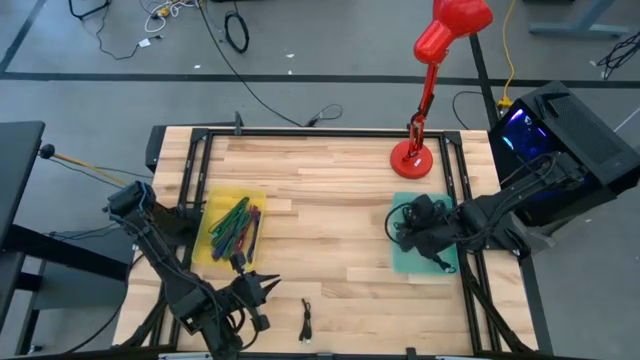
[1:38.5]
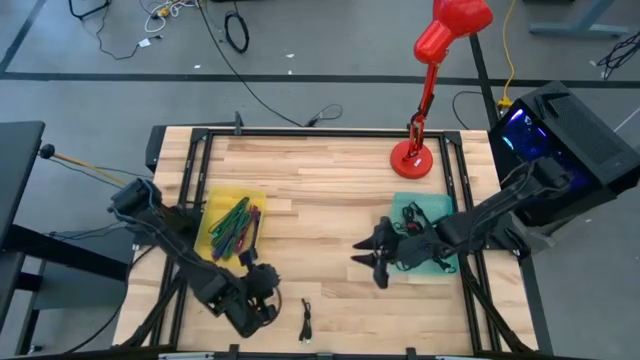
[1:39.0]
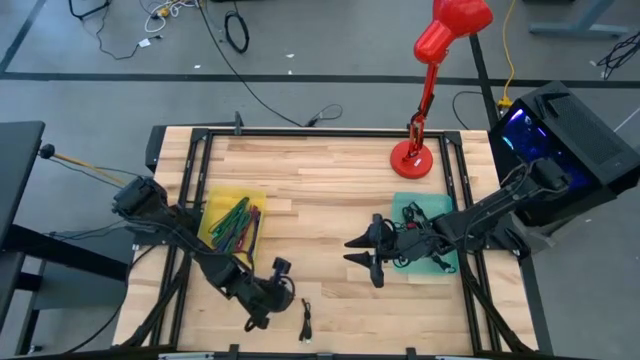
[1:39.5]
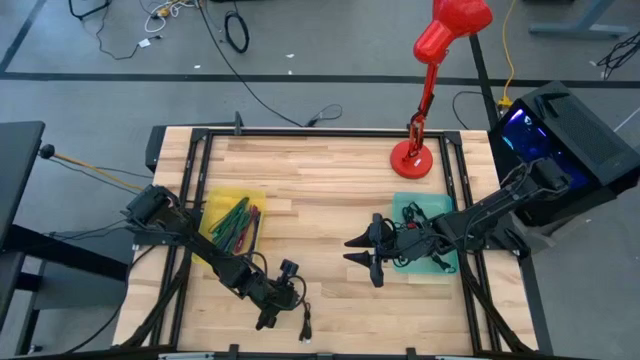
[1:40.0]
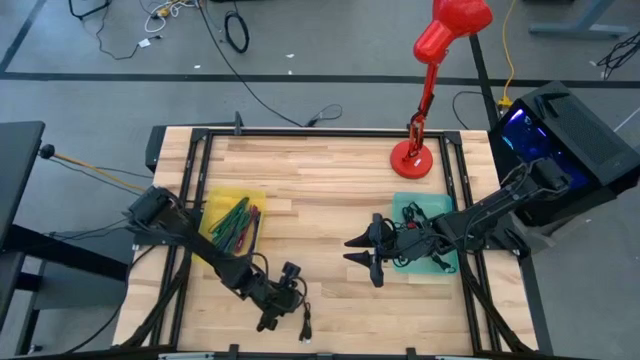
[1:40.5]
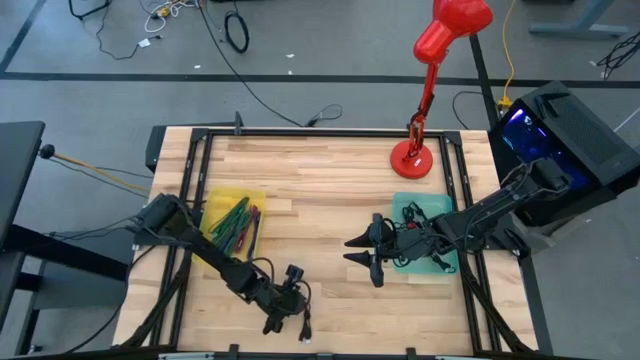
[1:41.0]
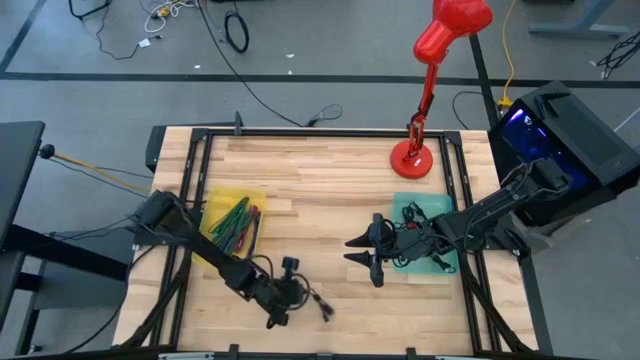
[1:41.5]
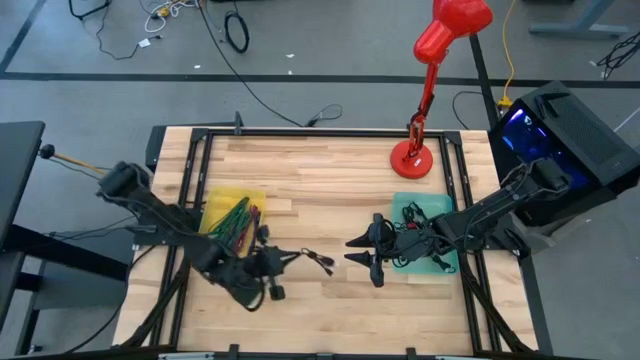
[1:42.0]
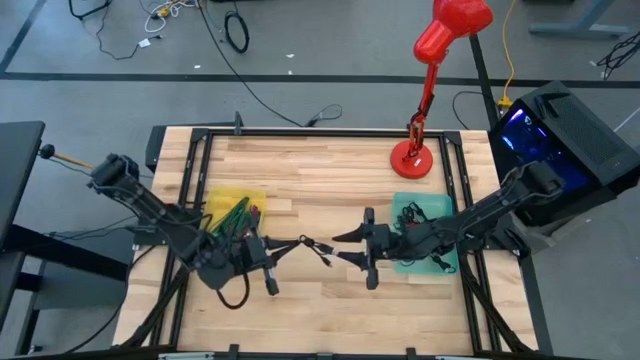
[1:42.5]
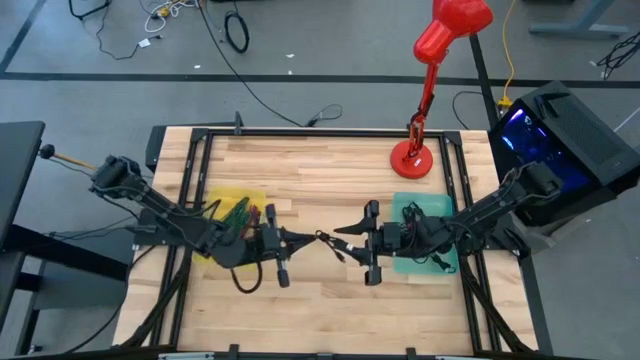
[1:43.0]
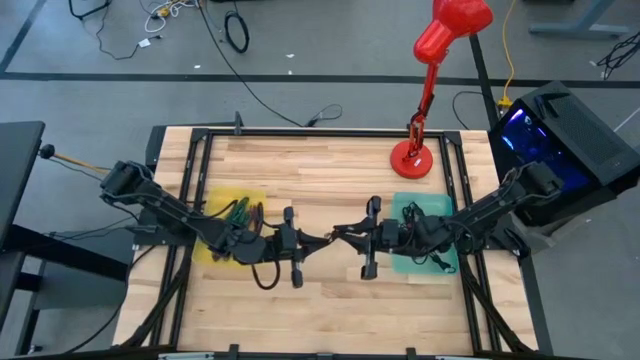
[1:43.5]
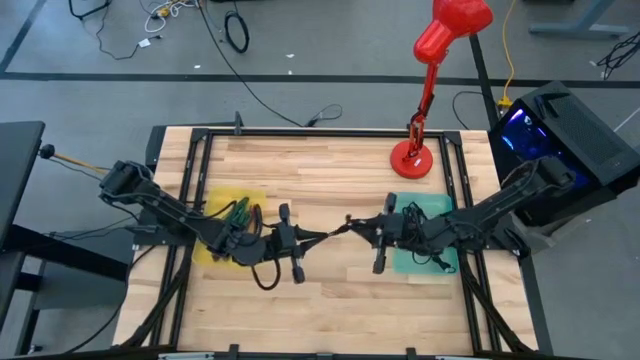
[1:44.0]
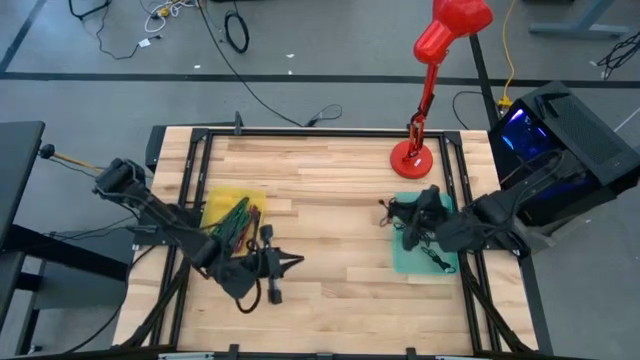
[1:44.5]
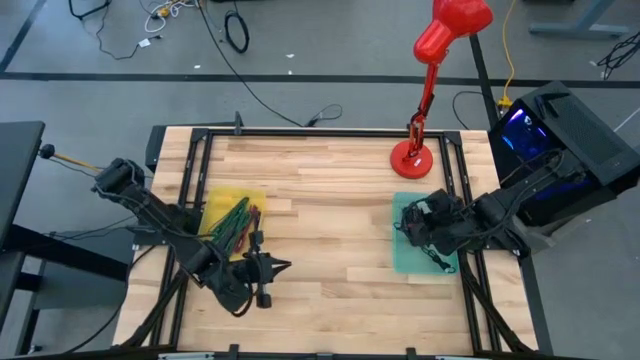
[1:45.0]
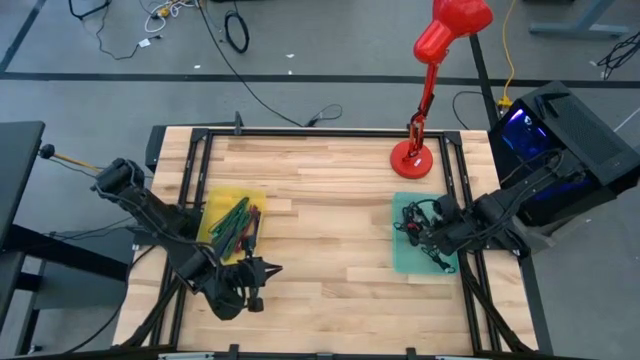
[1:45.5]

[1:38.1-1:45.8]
Task: Pick & Place USB Port
Put the black charger cable into the green bin

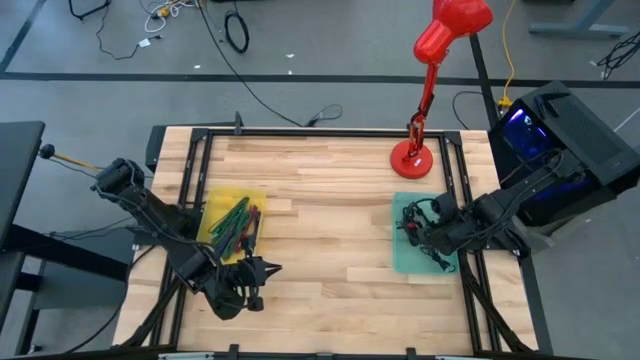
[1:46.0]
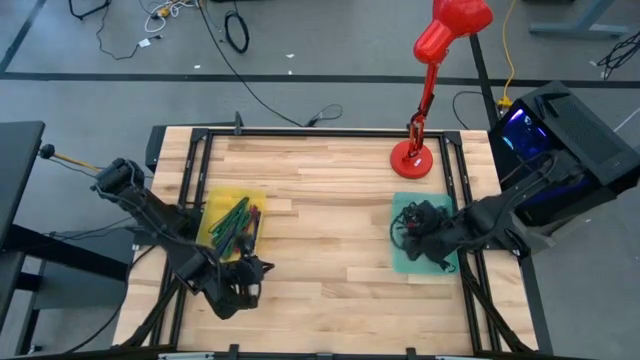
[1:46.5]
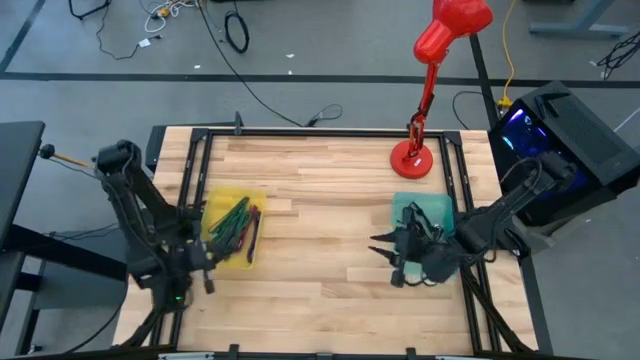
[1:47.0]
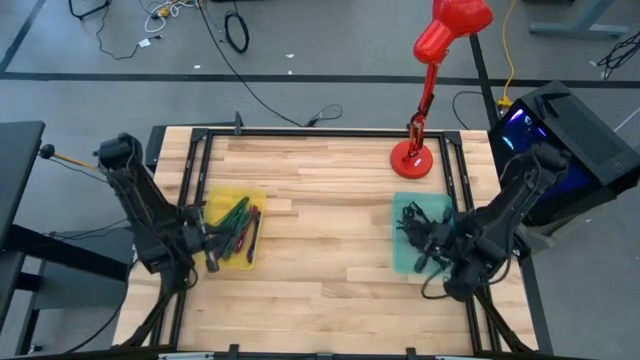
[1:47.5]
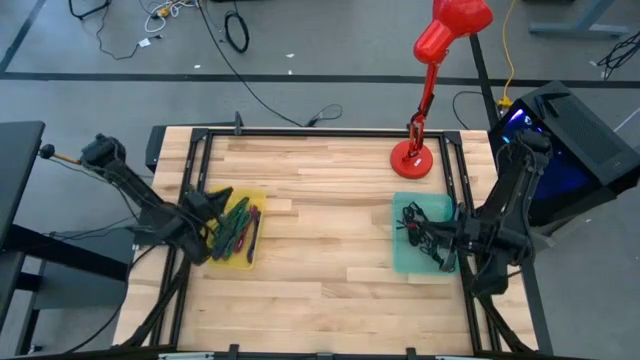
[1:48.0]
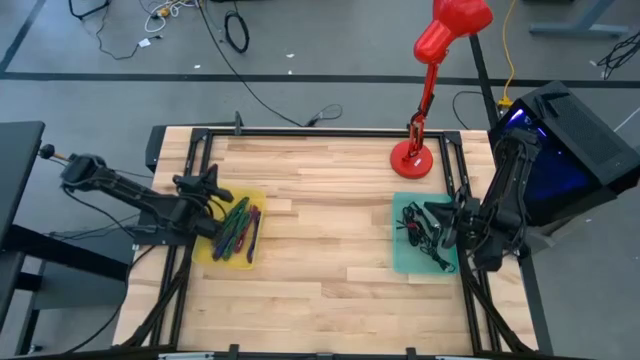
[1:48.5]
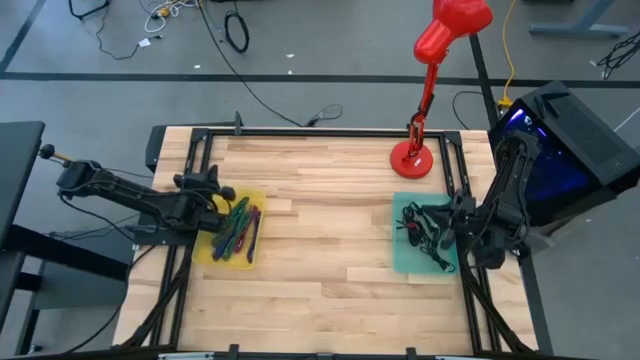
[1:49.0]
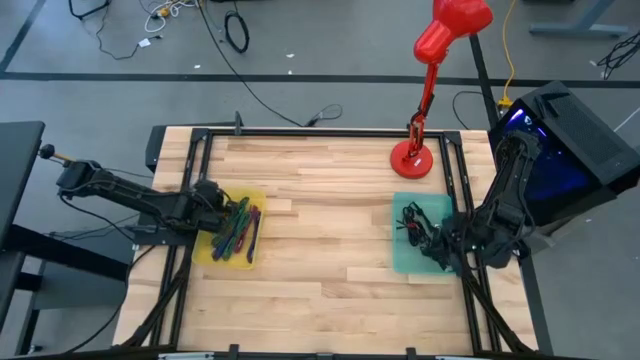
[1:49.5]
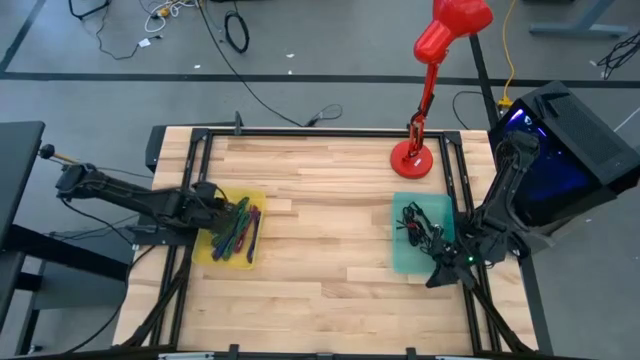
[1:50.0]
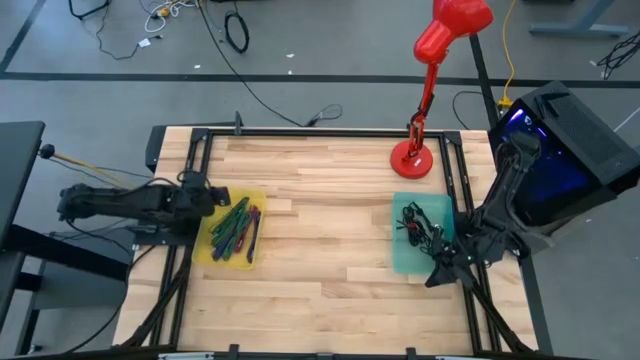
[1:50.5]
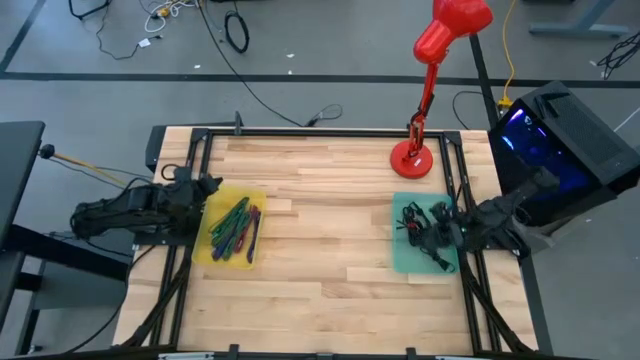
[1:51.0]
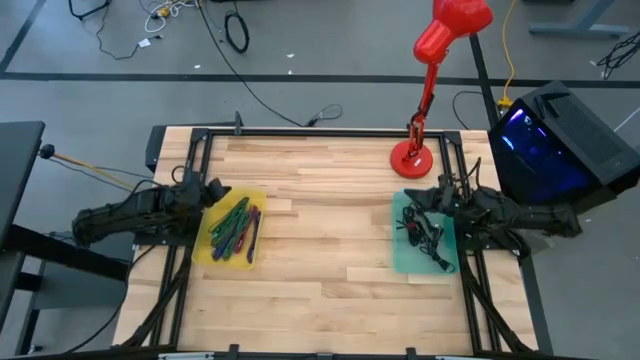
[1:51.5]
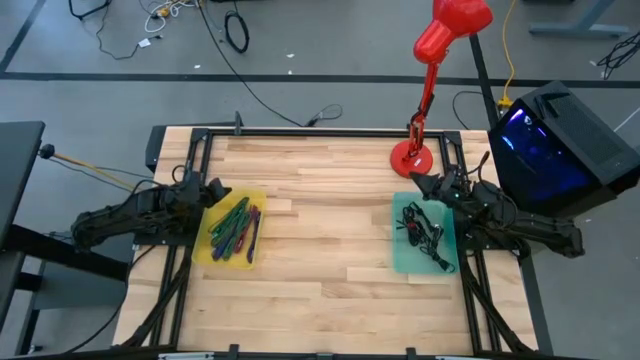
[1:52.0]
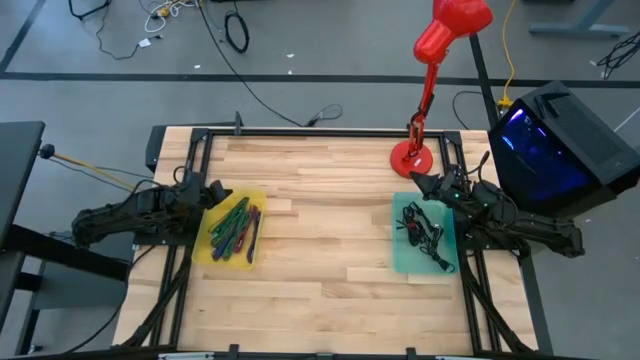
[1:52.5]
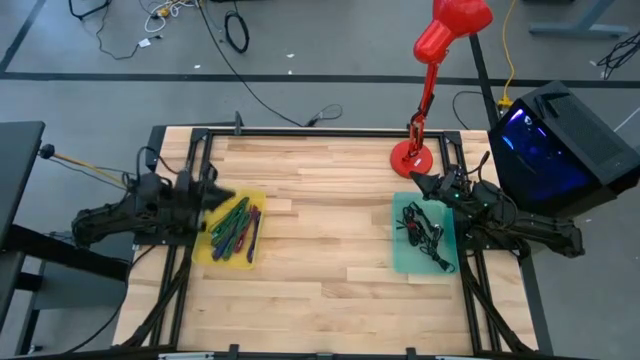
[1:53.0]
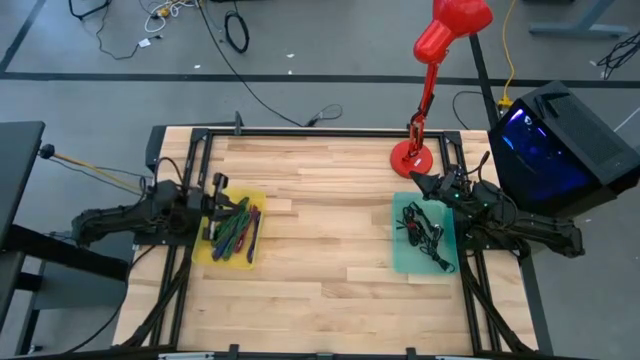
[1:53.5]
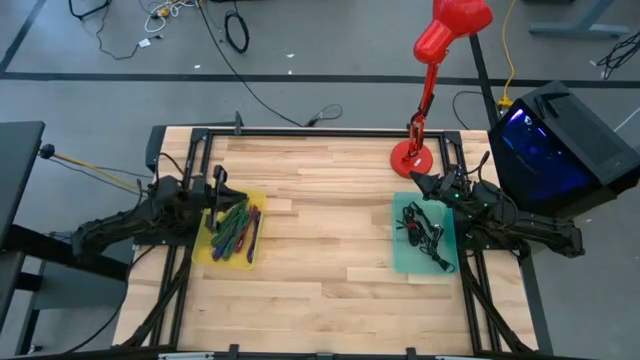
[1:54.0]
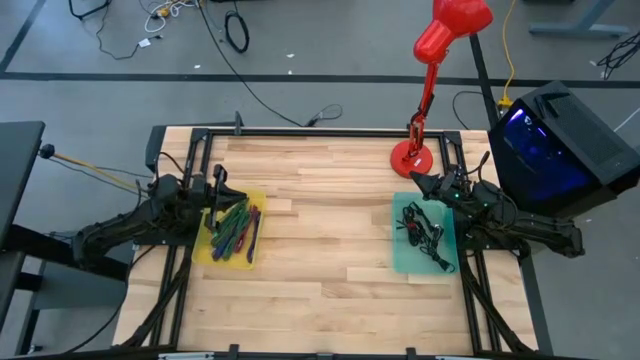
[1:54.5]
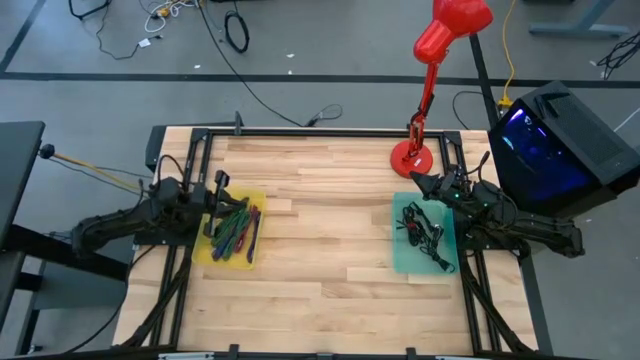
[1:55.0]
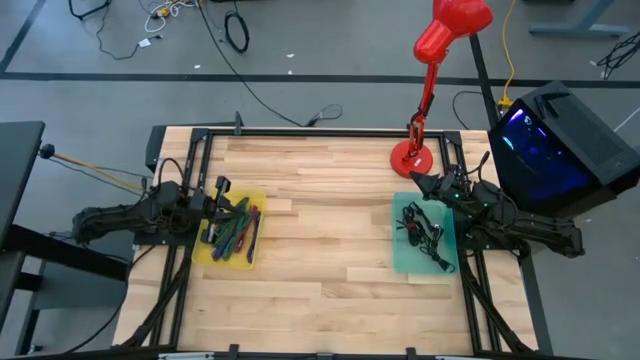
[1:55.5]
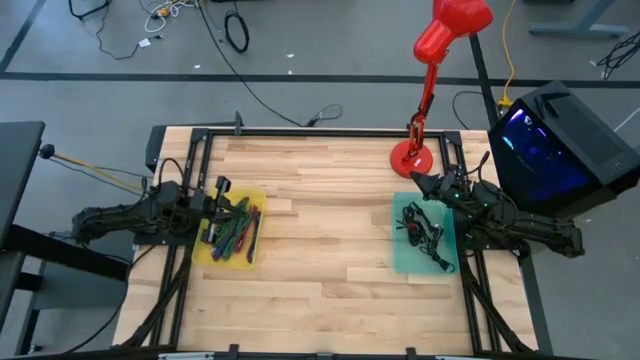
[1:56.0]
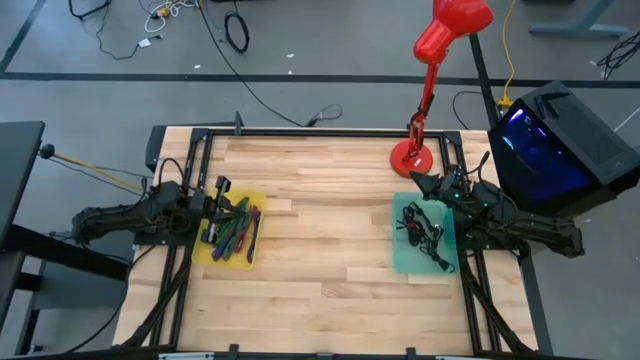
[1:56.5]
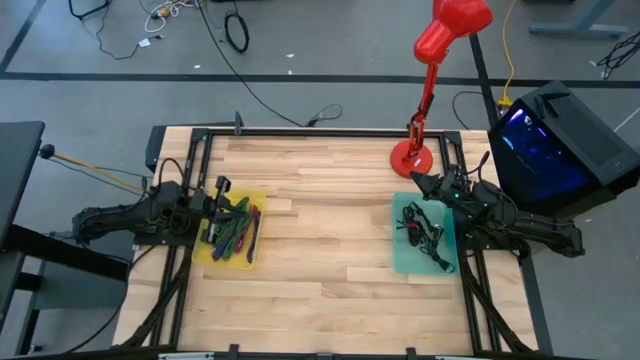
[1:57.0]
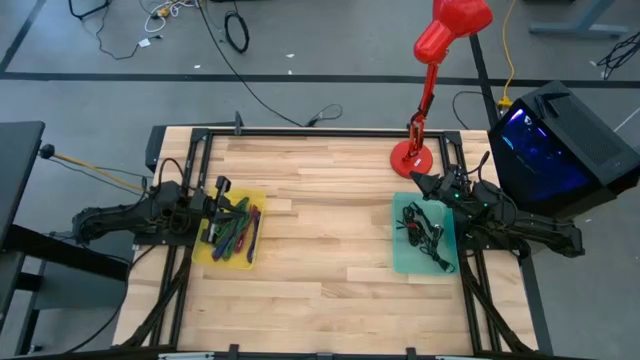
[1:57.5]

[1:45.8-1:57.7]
Return to Home Position

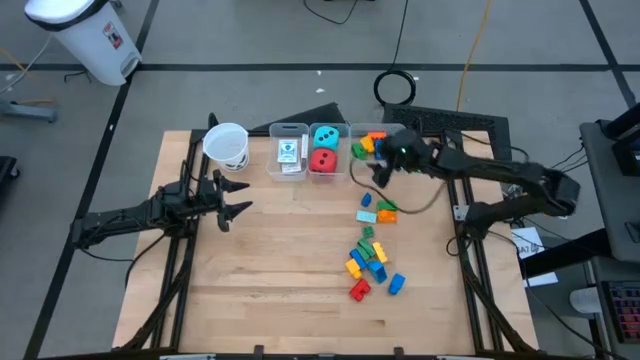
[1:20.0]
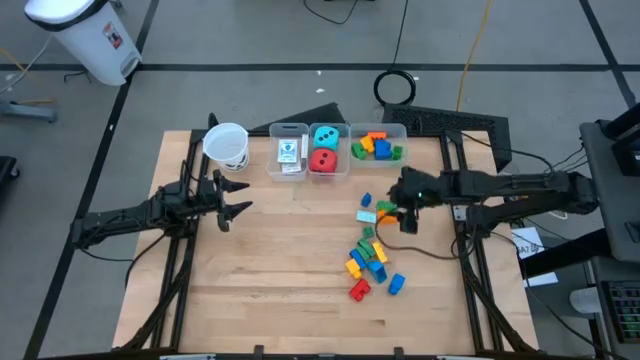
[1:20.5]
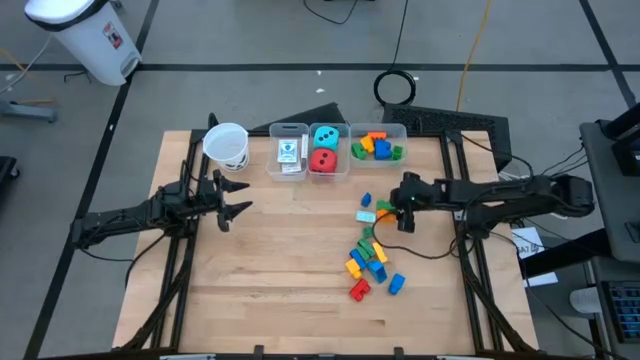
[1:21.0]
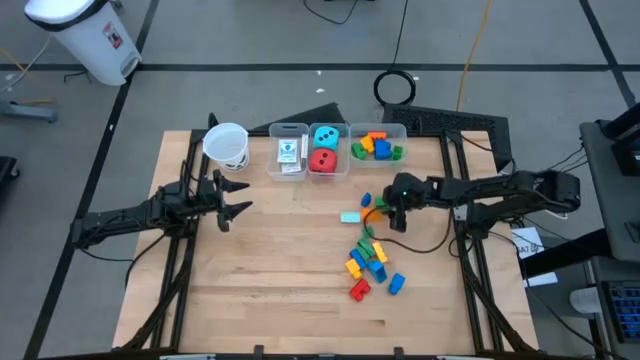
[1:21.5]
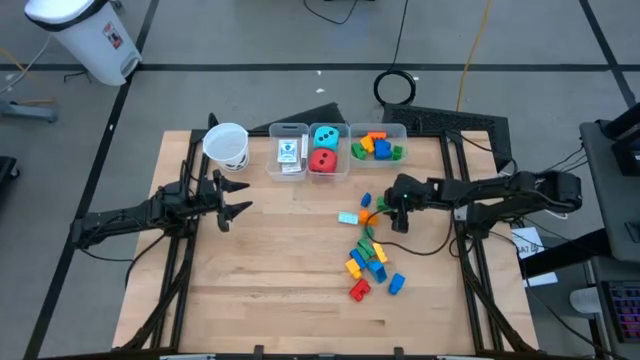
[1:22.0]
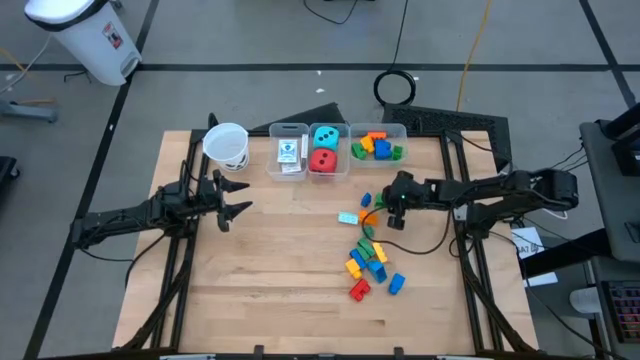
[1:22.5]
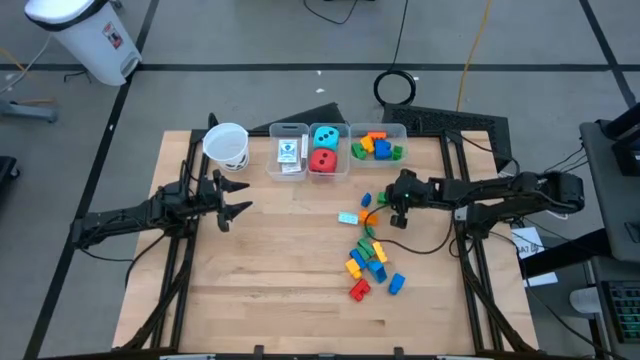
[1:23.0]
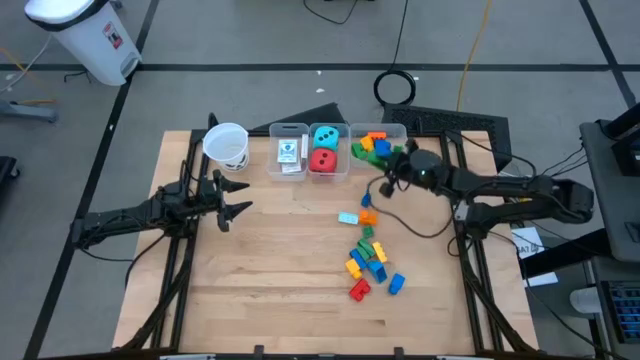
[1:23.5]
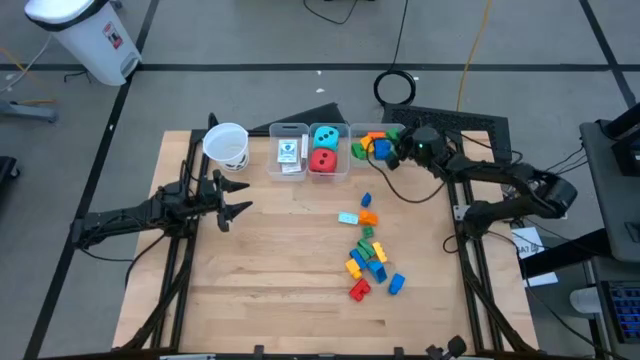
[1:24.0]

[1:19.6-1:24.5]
Task: Pick & Place Toys
Put the green game piece into the right transparent bin
